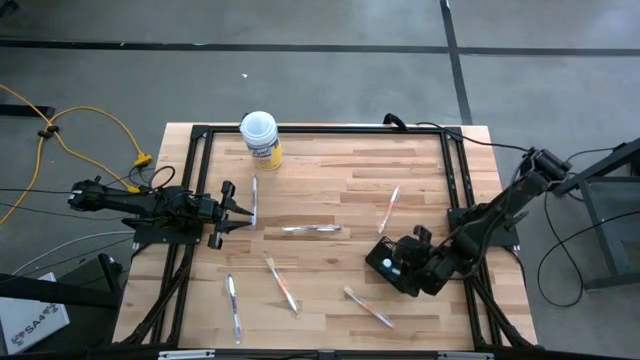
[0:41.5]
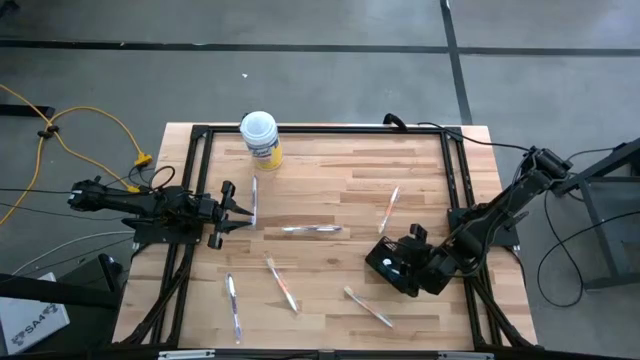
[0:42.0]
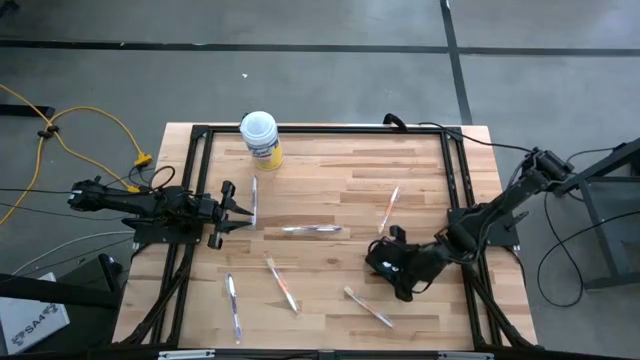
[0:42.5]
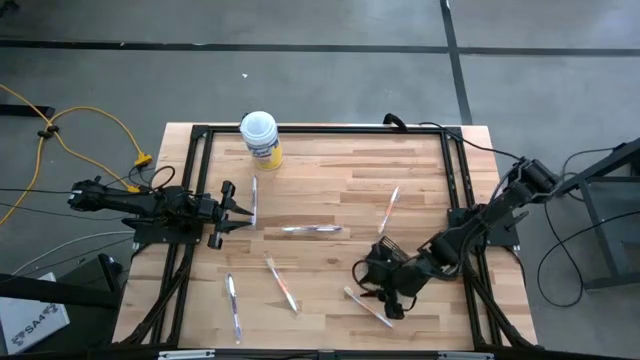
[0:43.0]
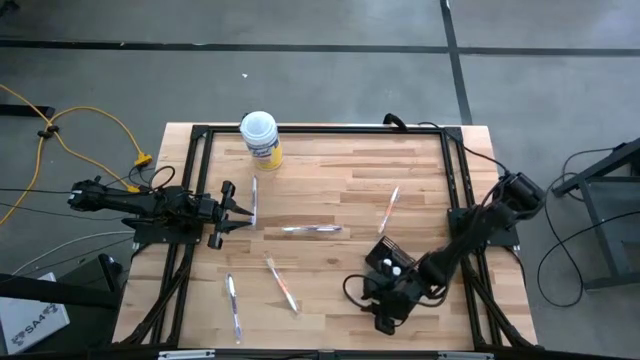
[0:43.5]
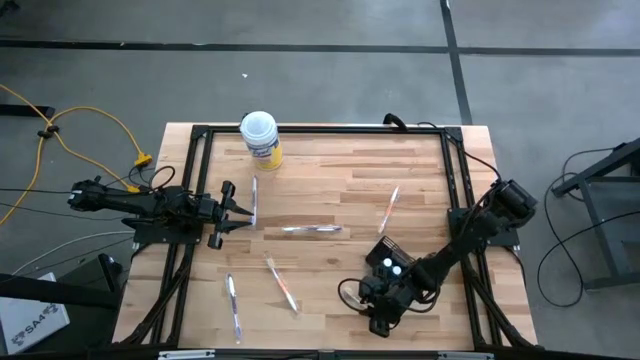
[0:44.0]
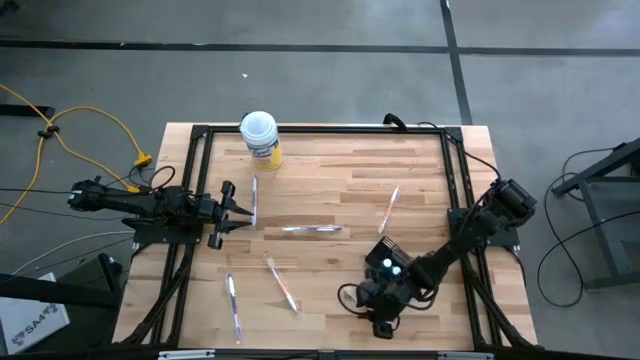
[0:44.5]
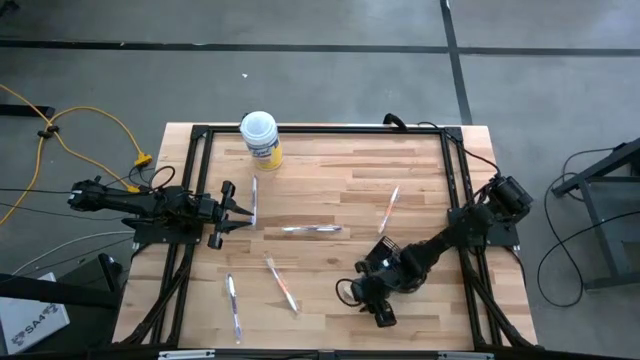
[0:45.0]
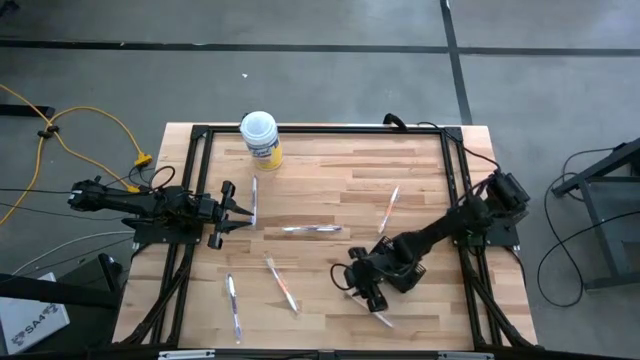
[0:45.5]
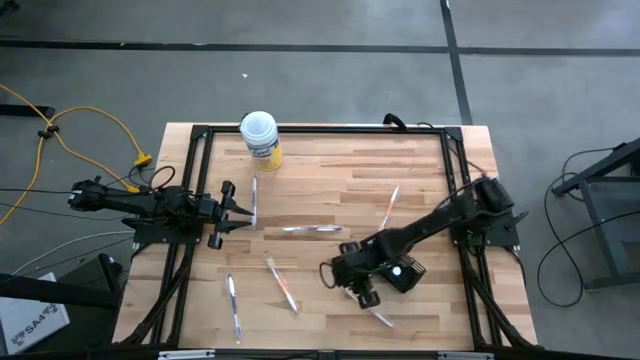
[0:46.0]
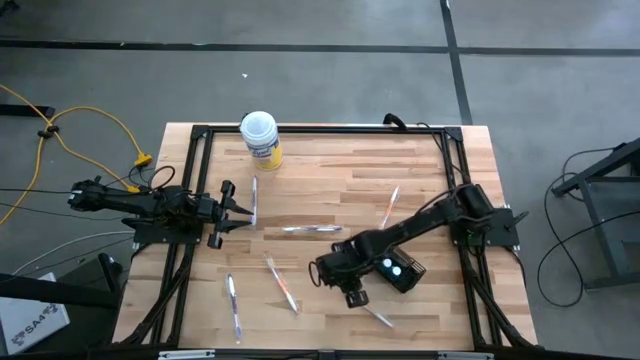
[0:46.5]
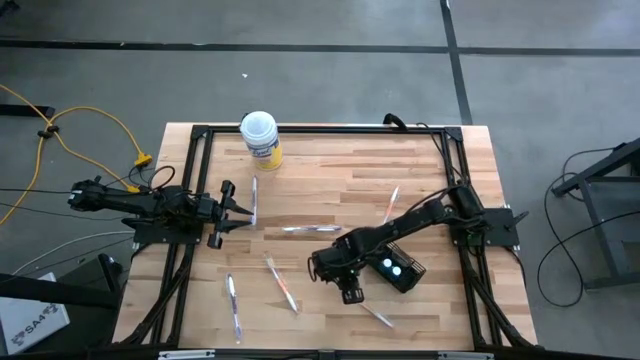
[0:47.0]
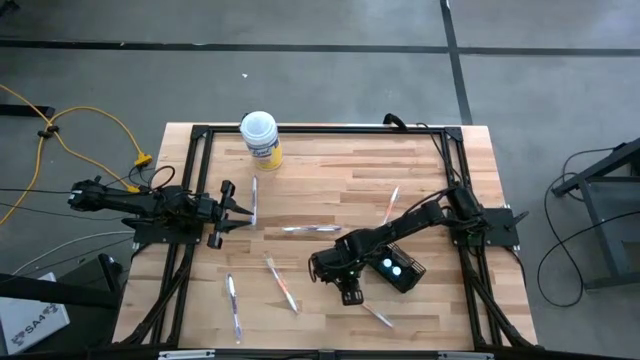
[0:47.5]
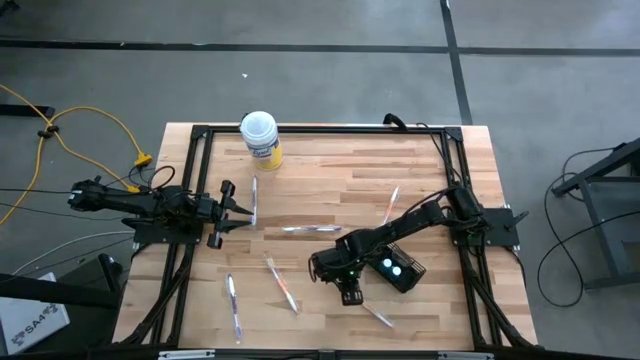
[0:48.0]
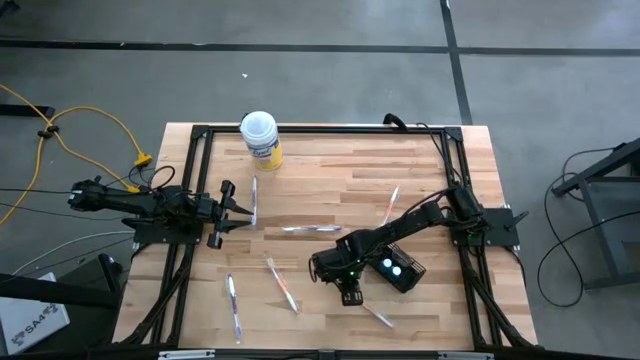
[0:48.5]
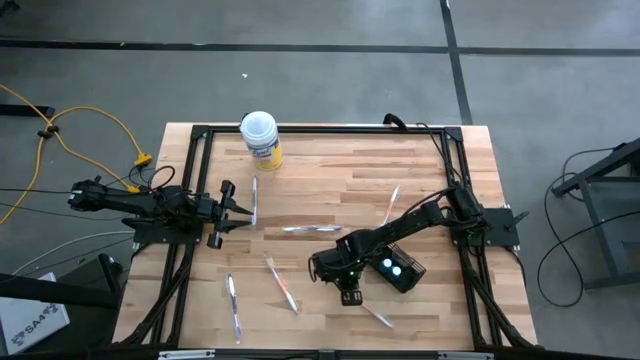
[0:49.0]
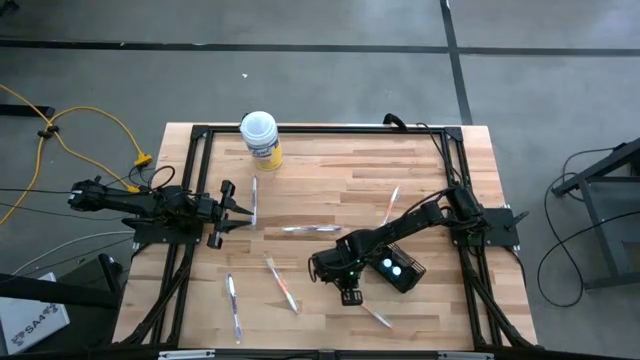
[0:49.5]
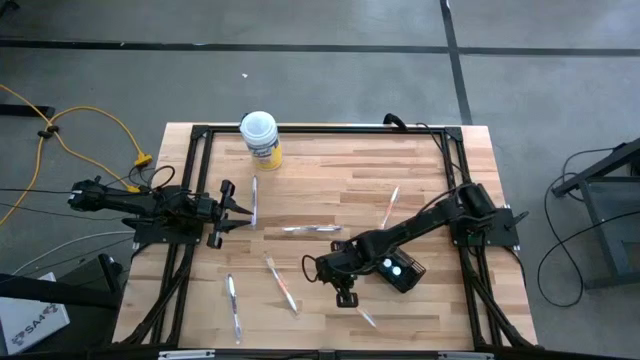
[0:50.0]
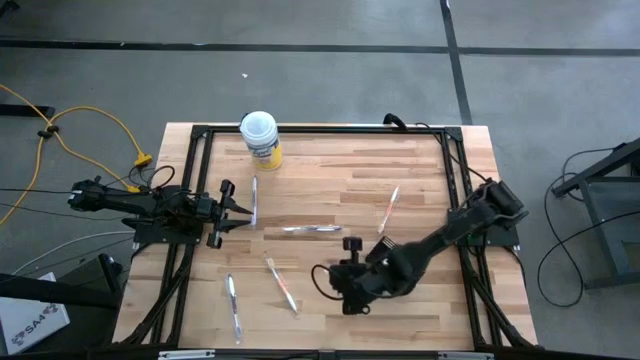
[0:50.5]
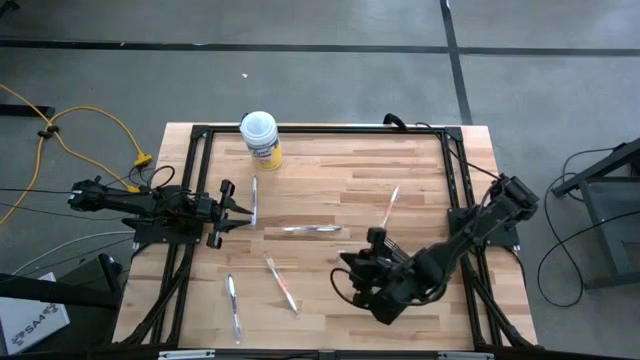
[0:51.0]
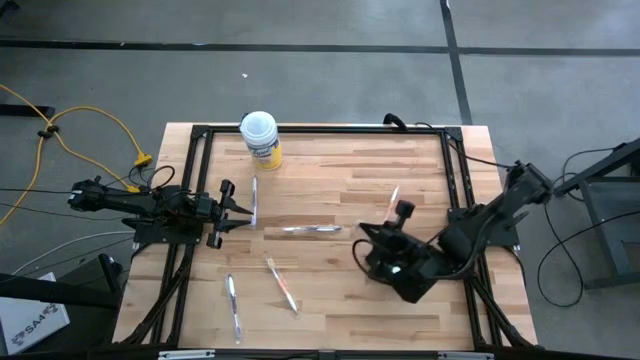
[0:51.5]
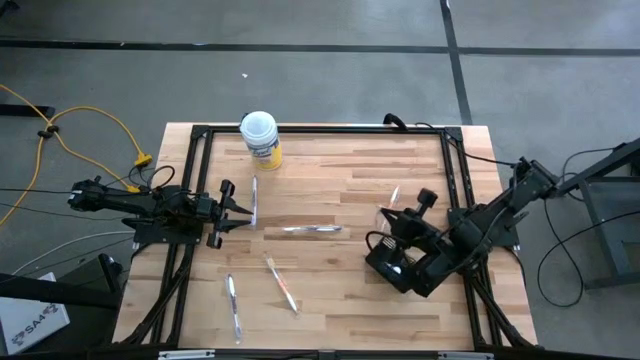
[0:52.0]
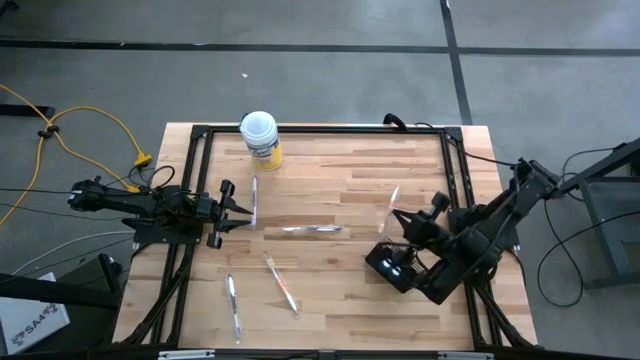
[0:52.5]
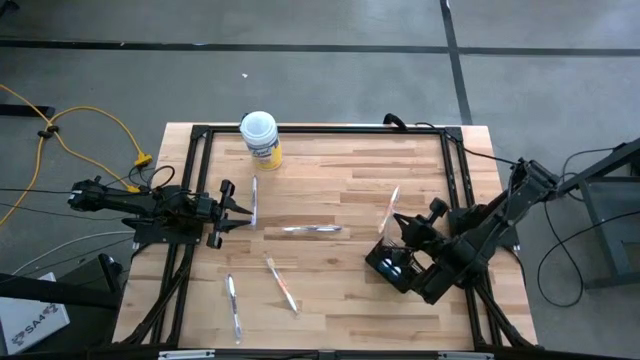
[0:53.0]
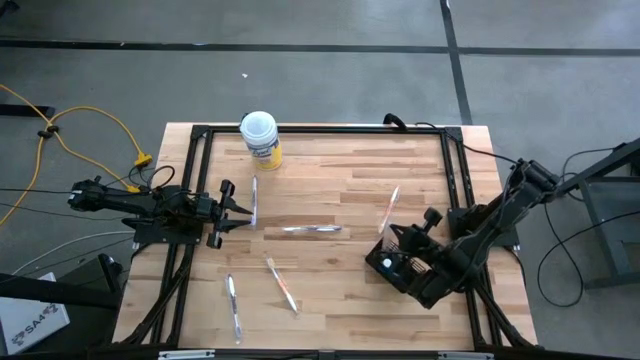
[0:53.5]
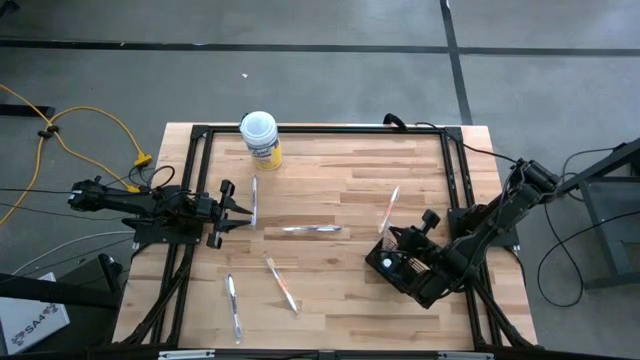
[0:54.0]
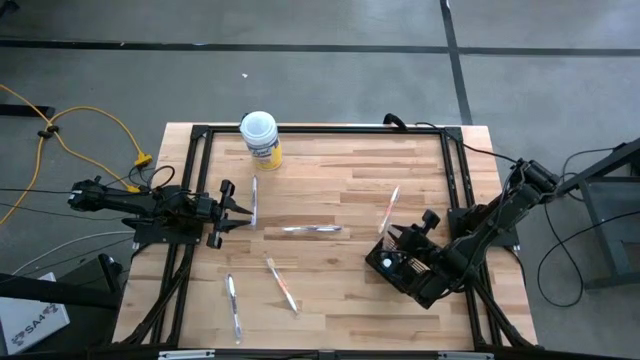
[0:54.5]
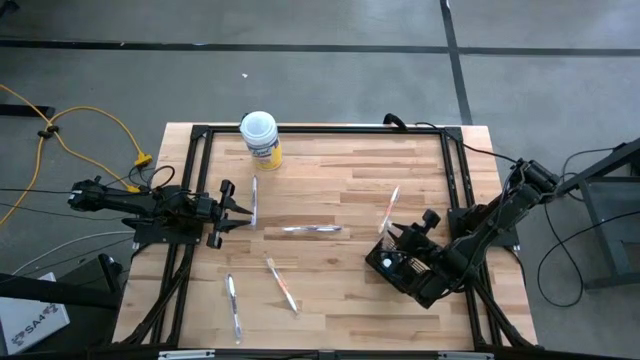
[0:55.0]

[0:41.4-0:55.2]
Task: Pick & Place toothbrushing station
Put the bottom orange toothbrush into the wire organizer
